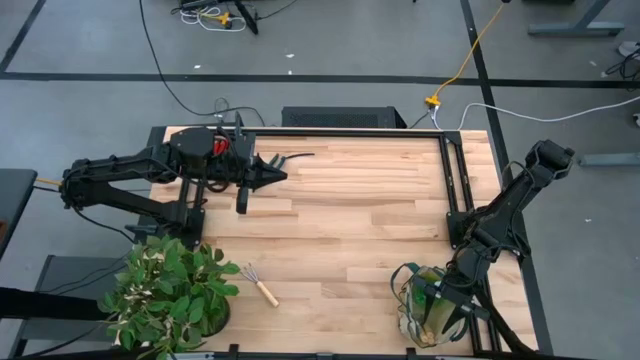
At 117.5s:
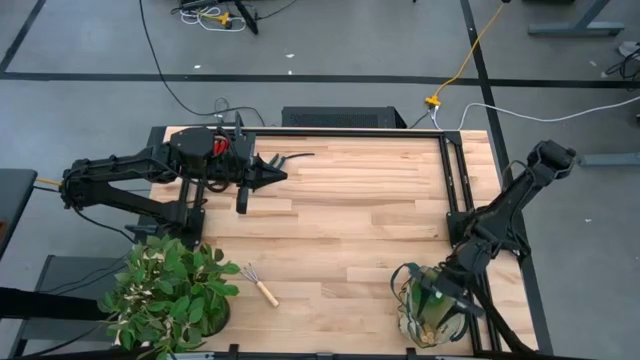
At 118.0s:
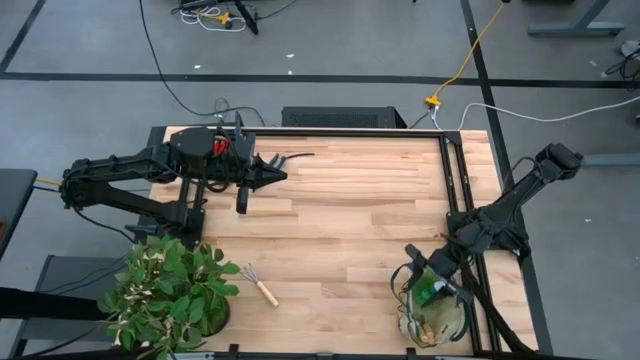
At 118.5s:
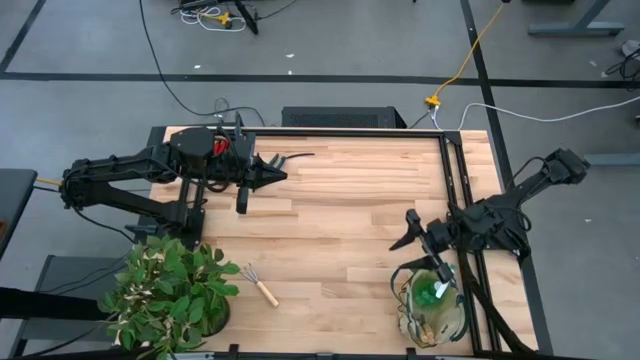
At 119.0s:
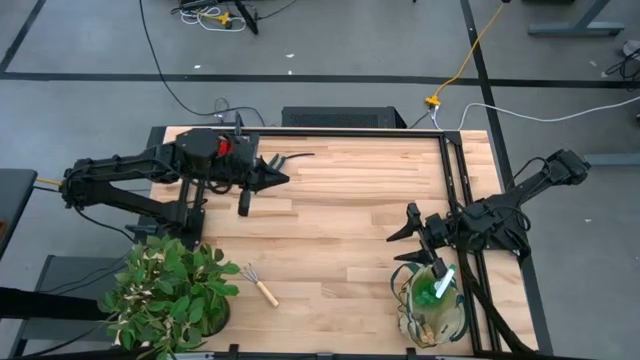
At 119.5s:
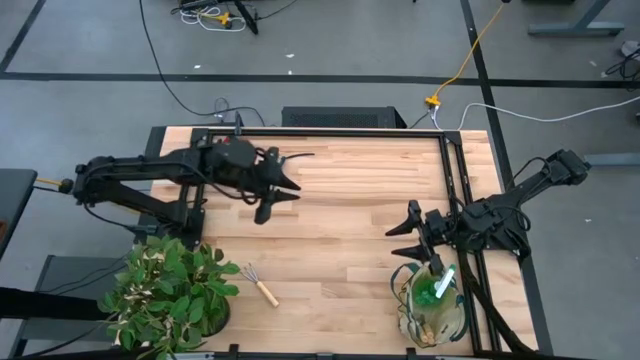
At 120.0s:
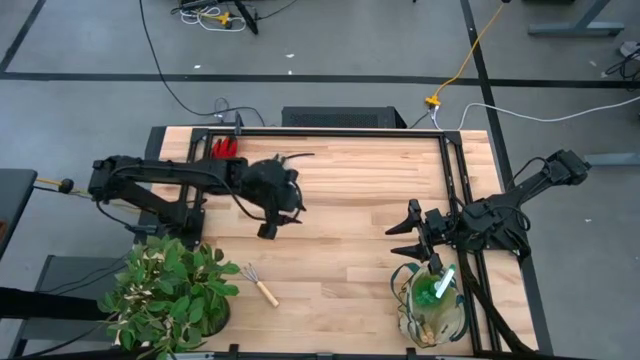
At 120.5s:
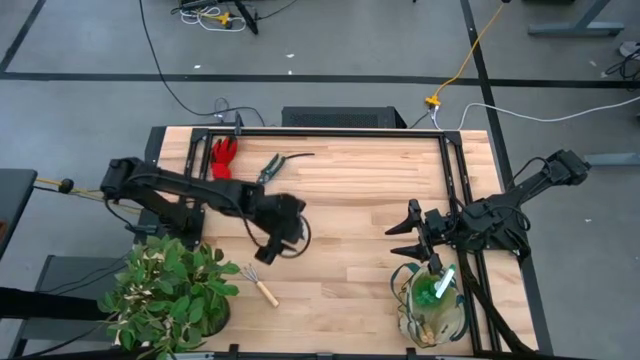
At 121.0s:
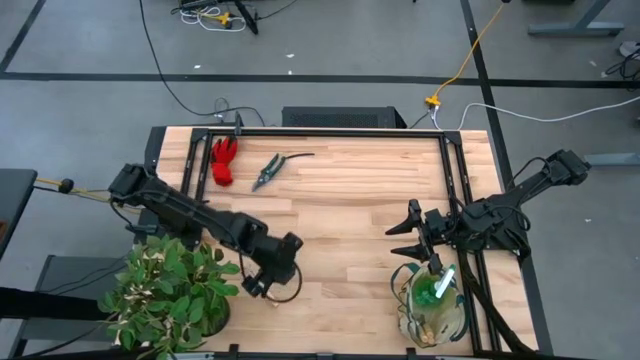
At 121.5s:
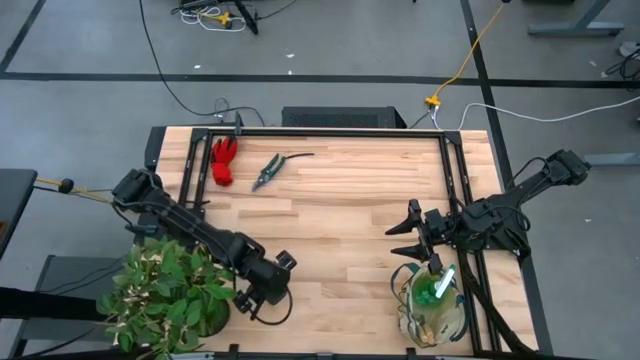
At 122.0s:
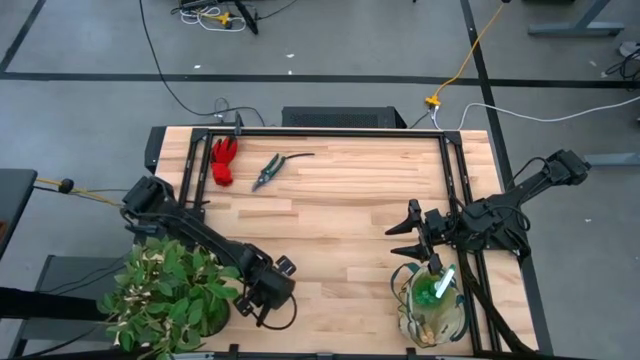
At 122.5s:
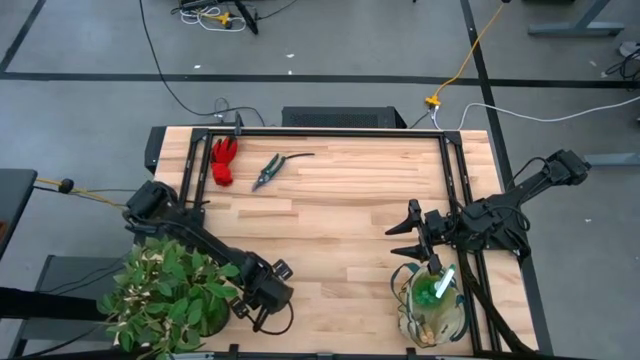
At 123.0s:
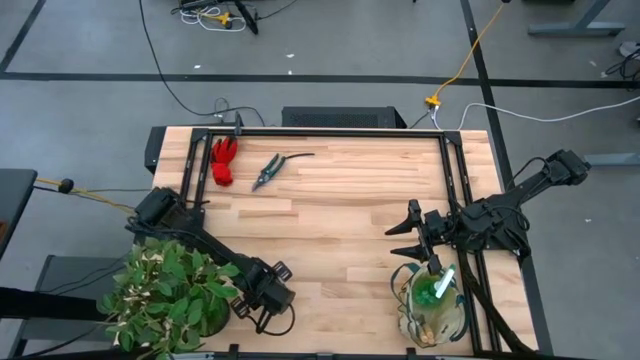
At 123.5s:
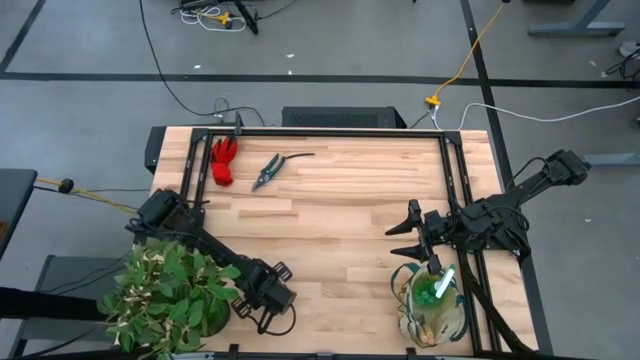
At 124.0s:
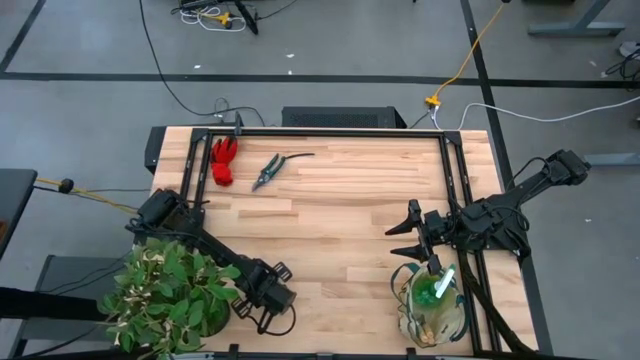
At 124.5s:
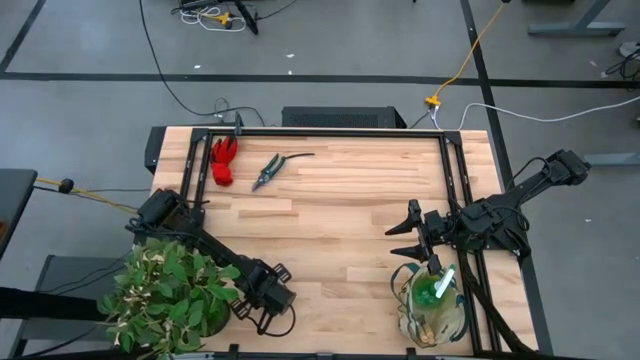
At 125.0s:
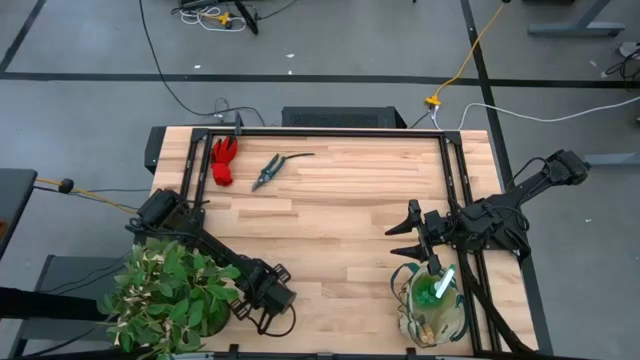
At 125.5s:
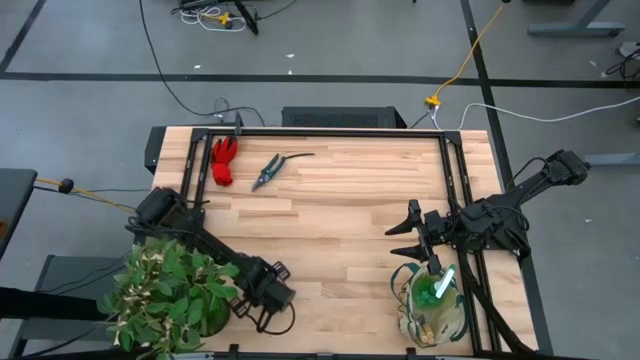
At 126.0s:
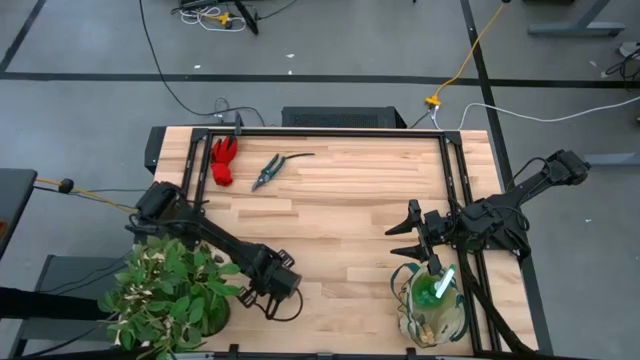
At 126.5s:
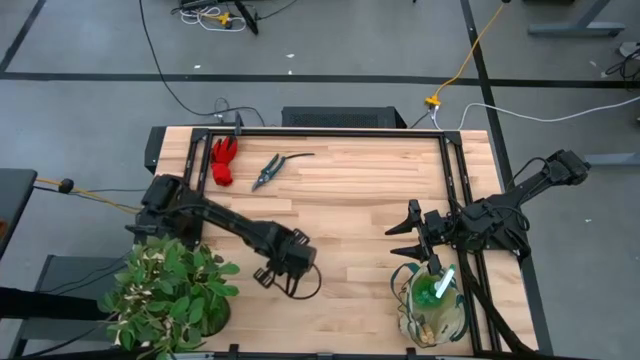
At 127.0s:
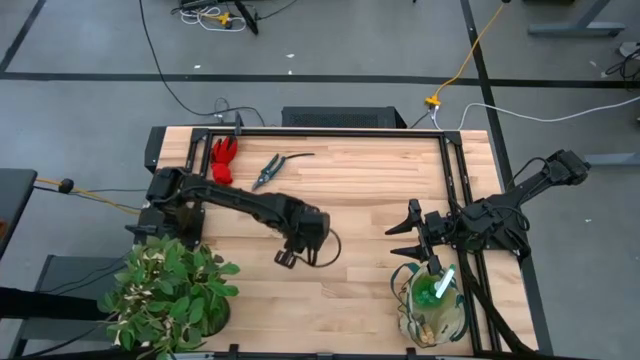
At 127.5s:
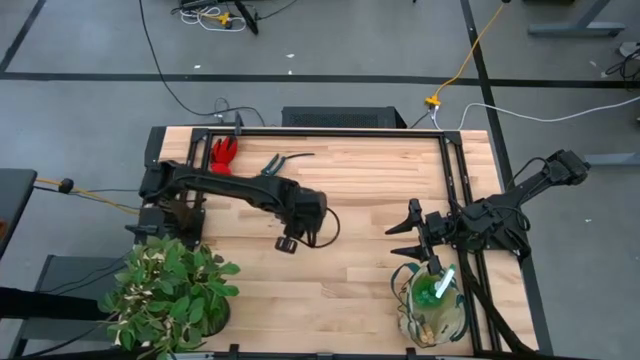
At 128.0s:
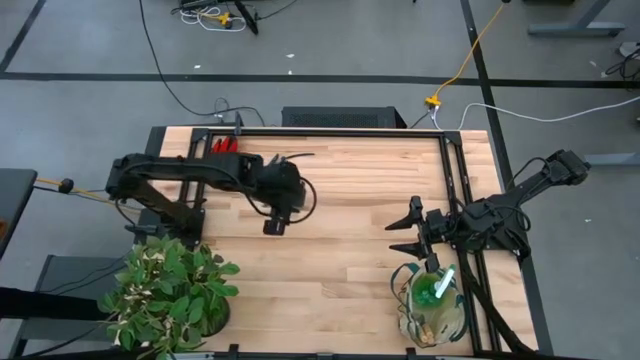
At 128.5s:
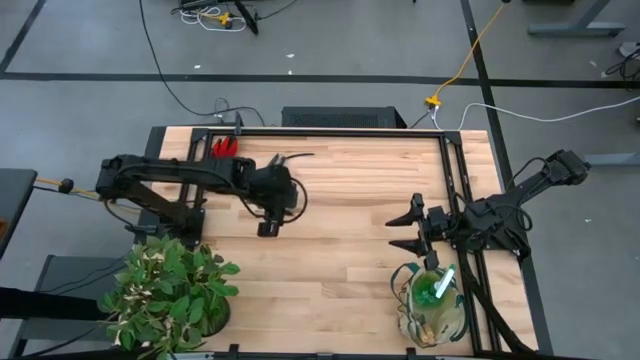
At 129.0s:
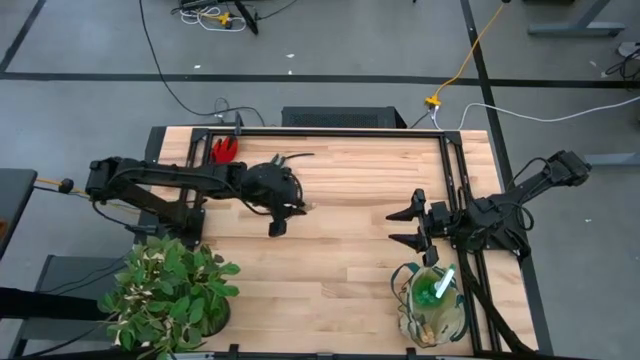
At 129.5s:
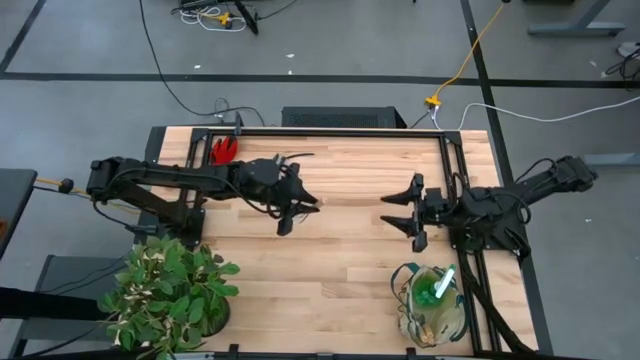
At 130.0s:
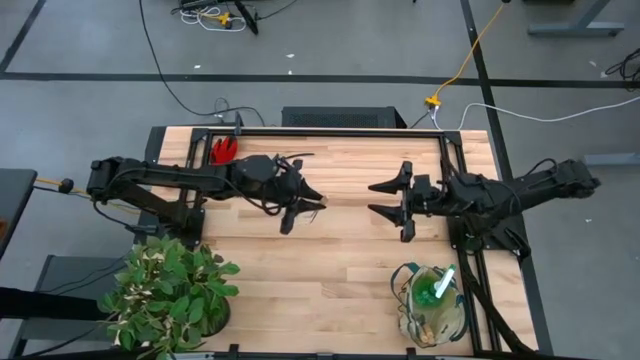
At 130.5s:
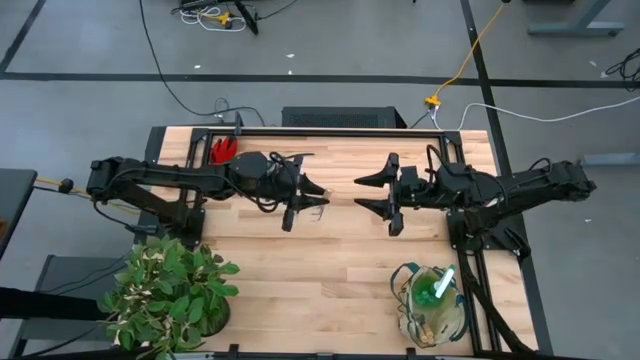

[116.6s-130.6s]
Task: Pick & Place Garden tools in Gardening bag
Put the brown hand rake into the white gardening bag

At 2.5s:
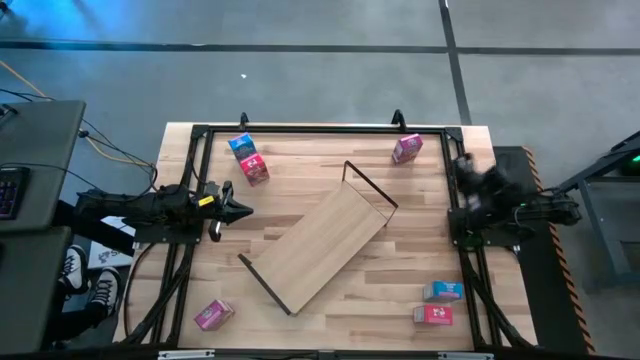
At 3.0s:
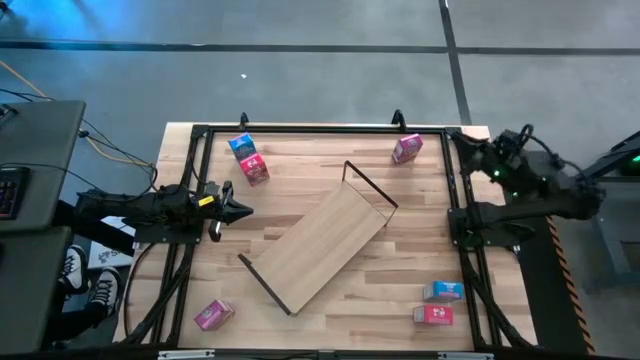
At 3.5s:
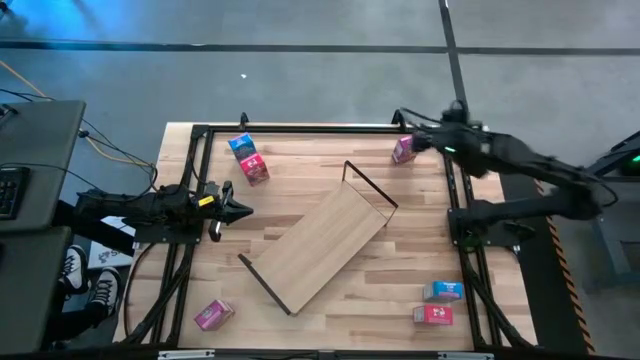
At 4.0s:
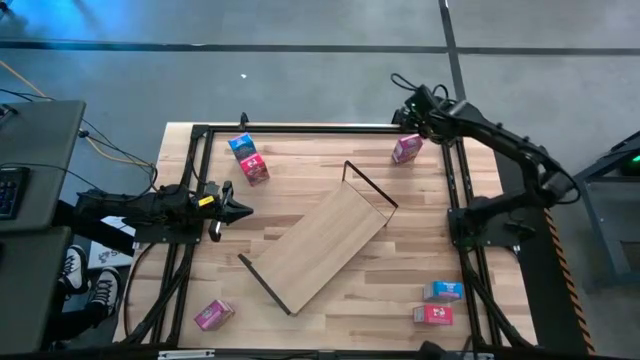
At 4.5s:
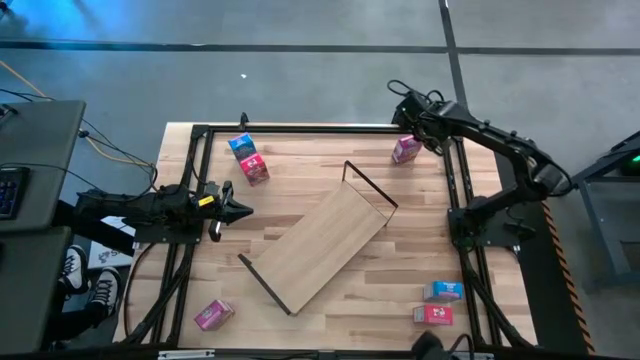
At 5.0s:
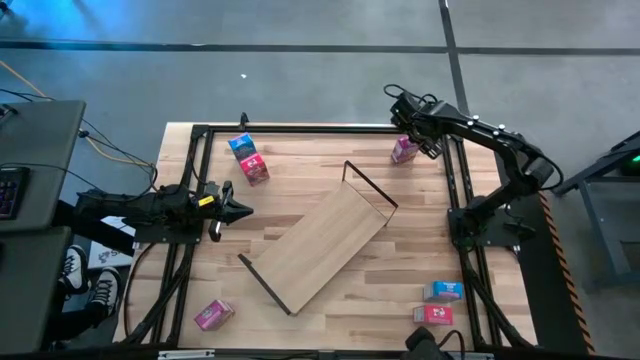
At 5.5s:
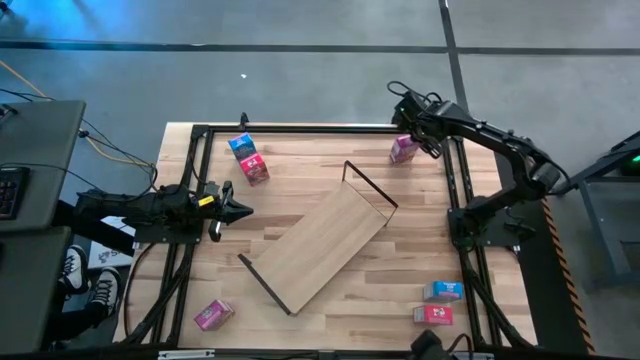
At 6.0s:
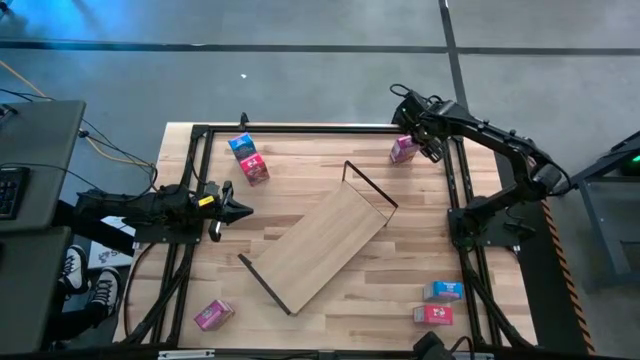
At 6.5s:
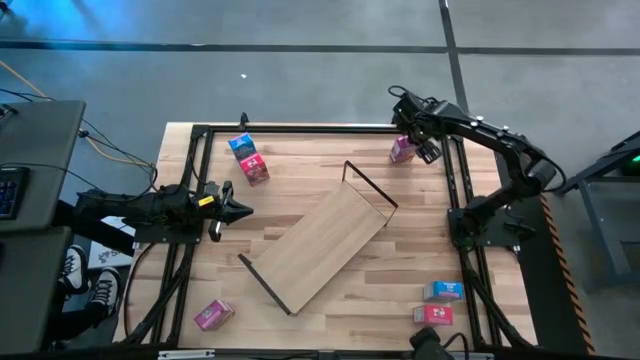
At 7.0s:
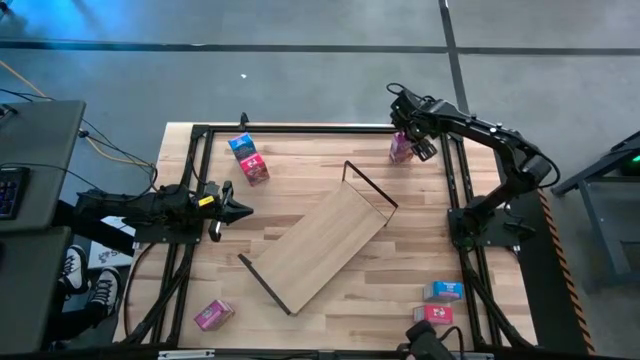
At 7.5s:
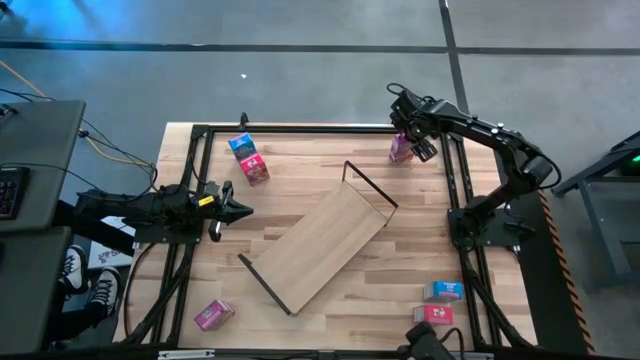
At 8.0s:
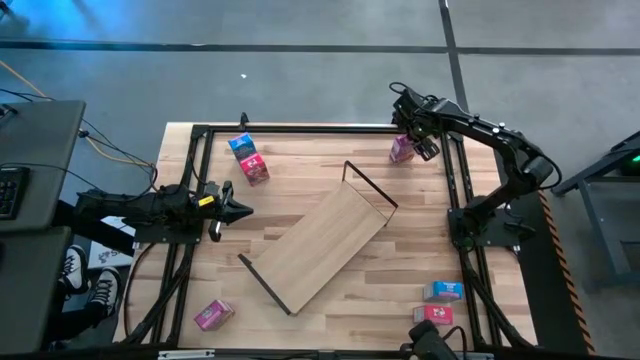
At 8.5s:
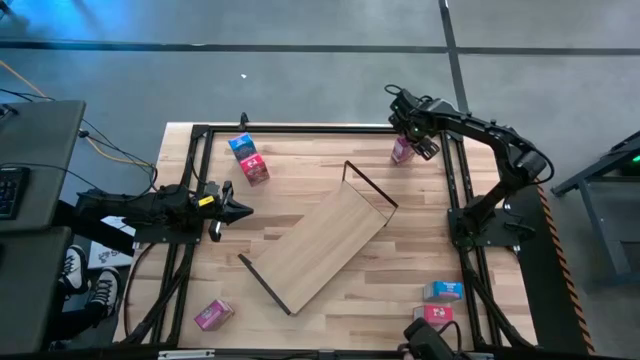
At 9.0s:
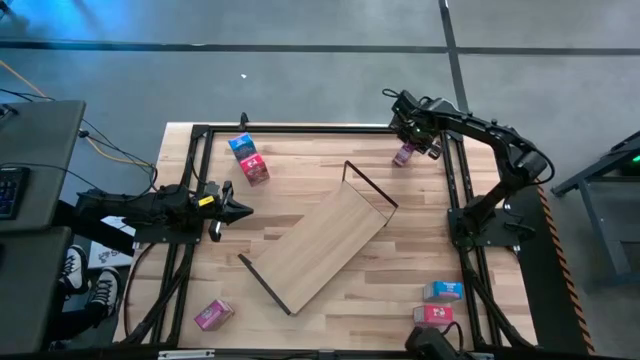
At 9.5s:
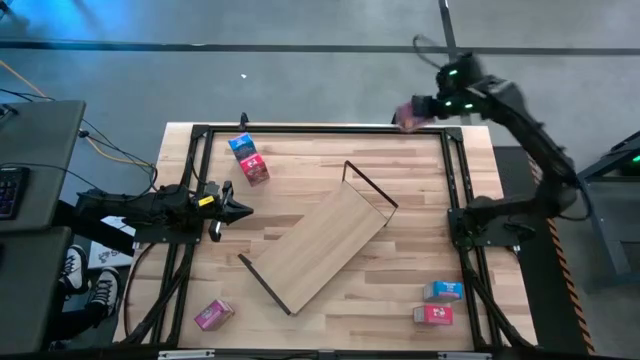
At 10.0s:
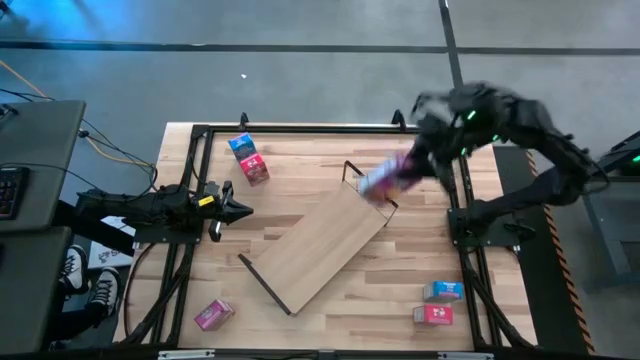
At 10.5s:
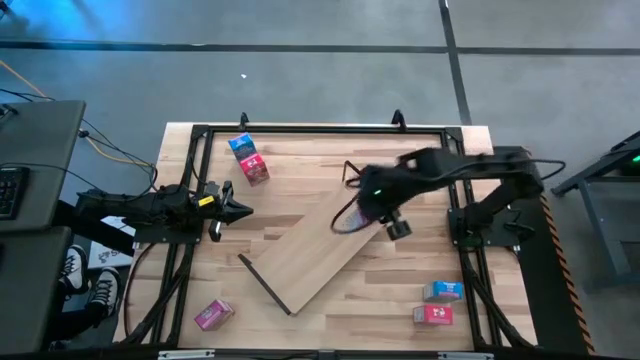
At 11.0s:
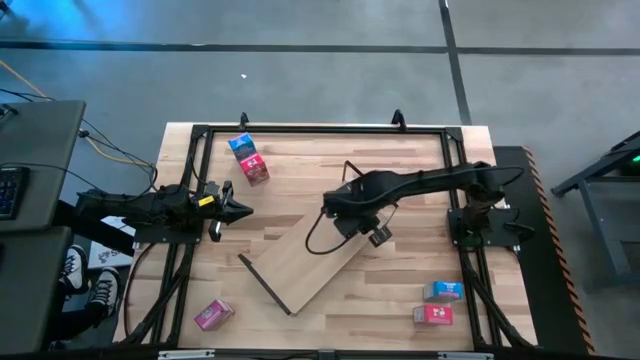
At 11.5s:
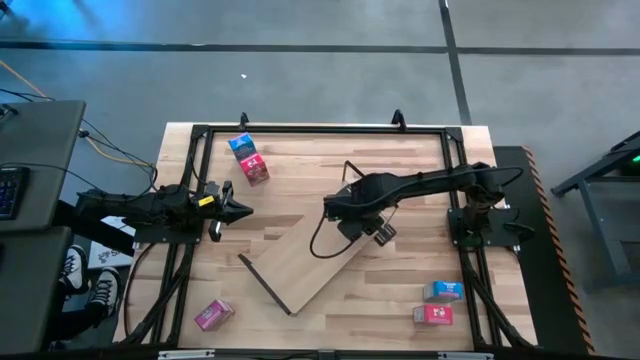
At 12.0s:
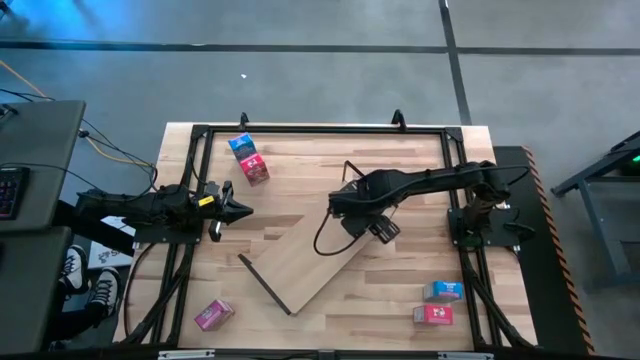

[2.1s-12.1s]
Task: Stack cereal on shelf
Put the top purple cereal box on the shelf
